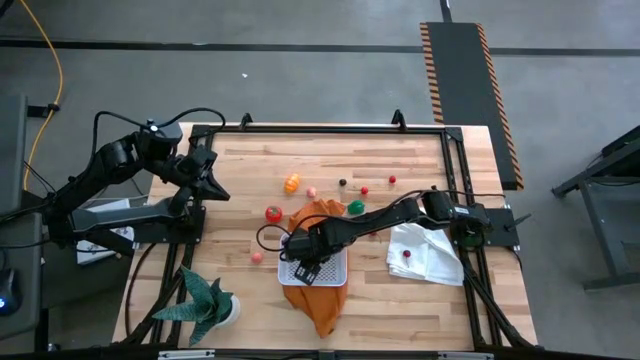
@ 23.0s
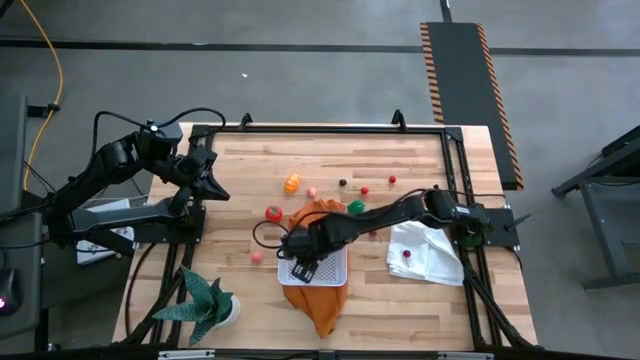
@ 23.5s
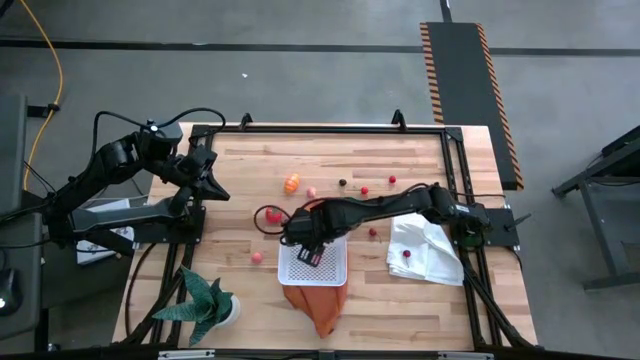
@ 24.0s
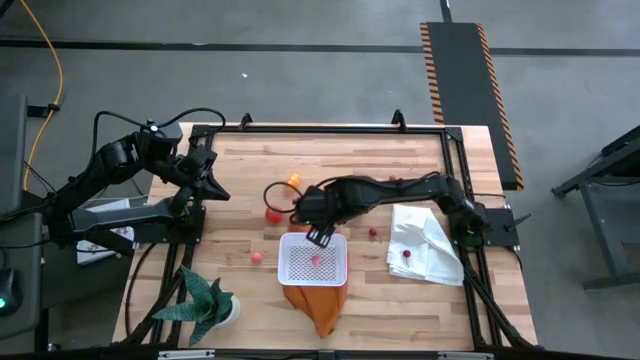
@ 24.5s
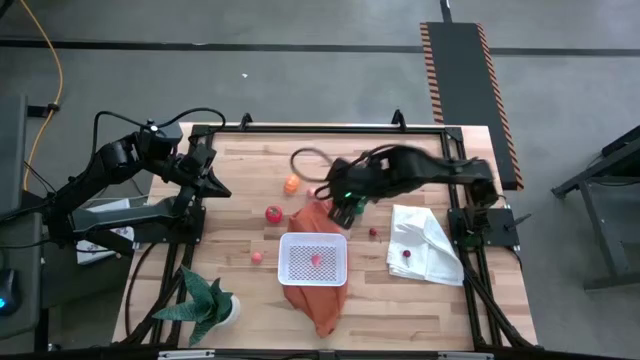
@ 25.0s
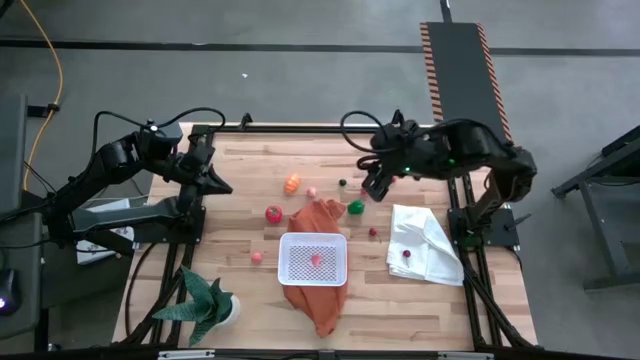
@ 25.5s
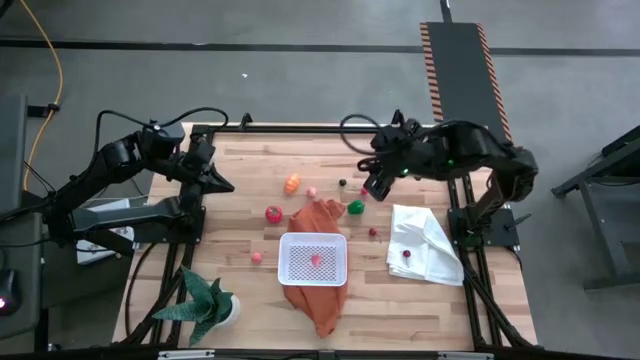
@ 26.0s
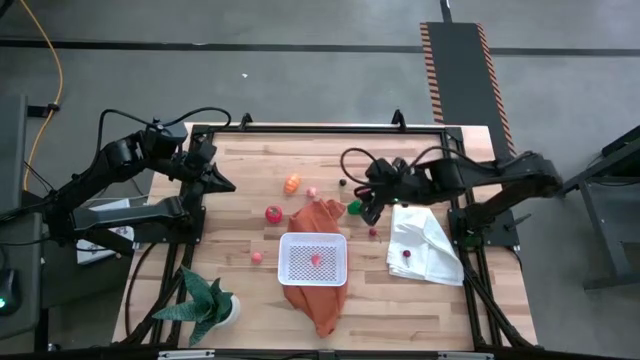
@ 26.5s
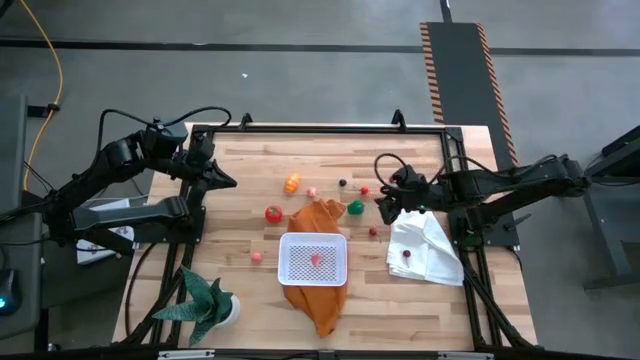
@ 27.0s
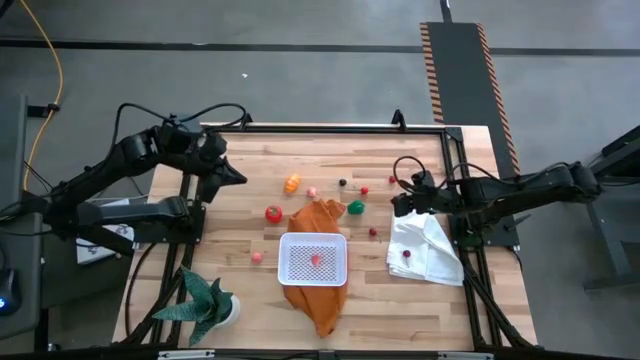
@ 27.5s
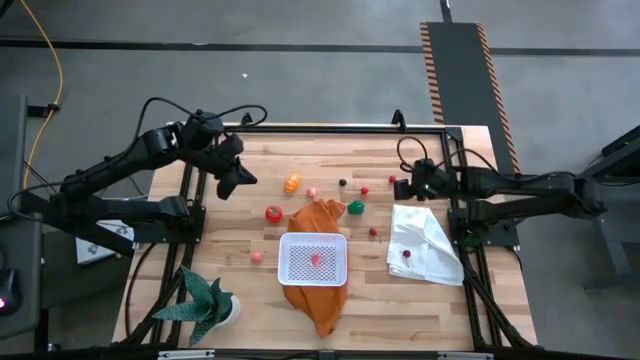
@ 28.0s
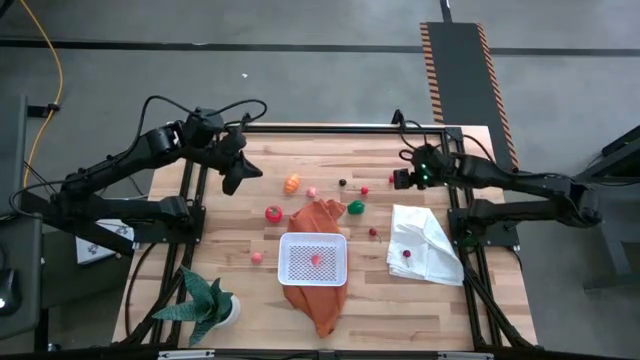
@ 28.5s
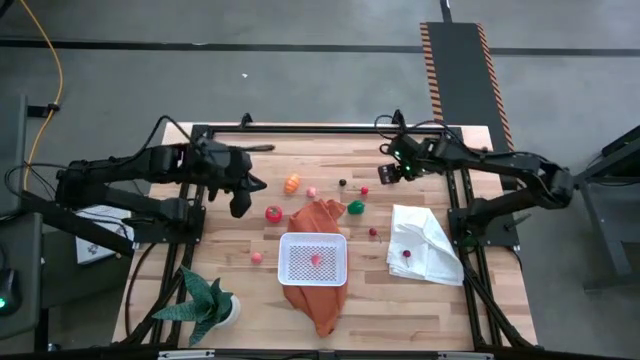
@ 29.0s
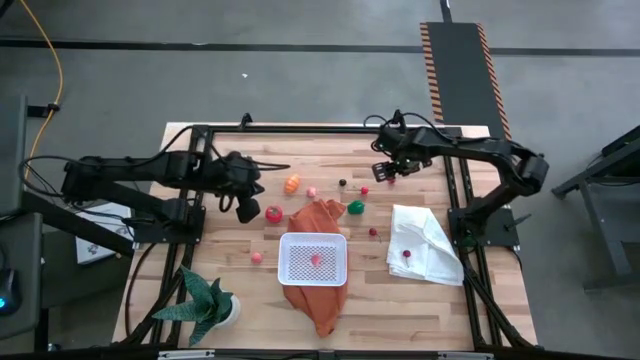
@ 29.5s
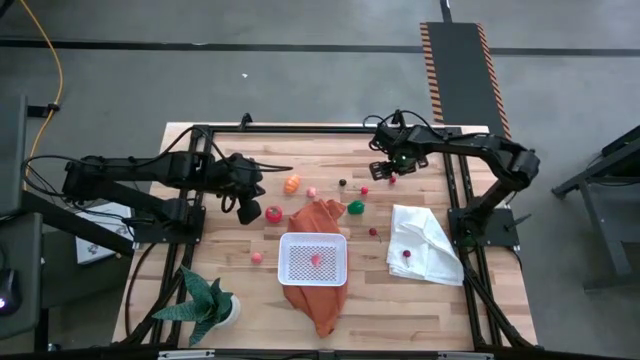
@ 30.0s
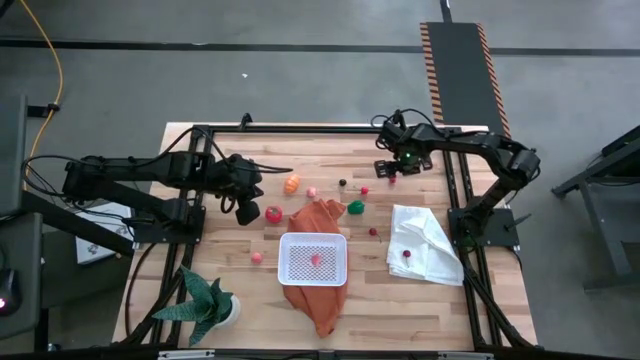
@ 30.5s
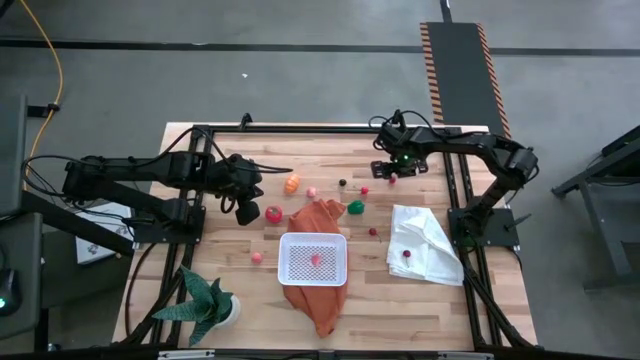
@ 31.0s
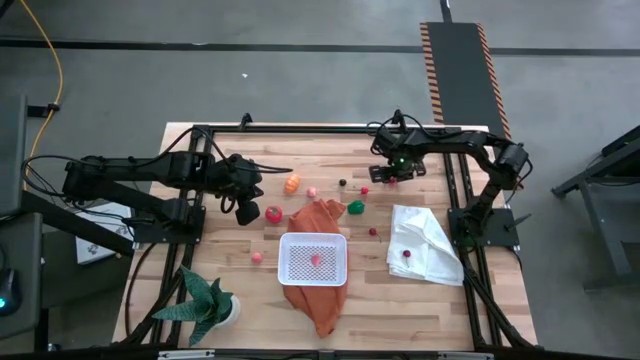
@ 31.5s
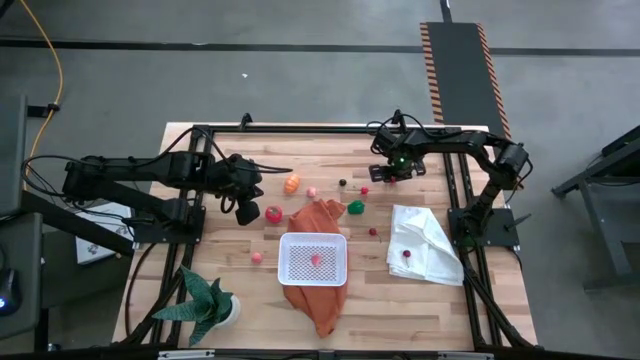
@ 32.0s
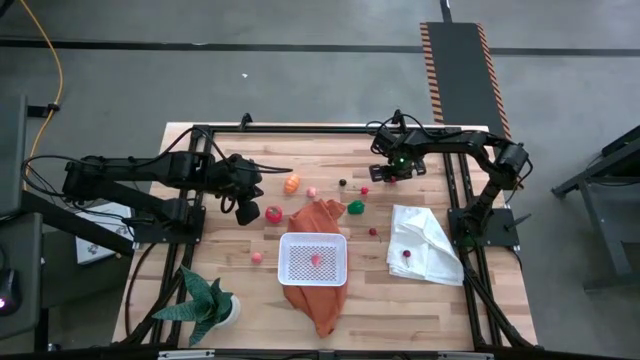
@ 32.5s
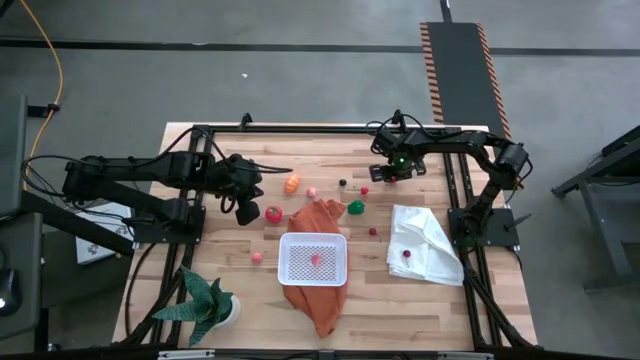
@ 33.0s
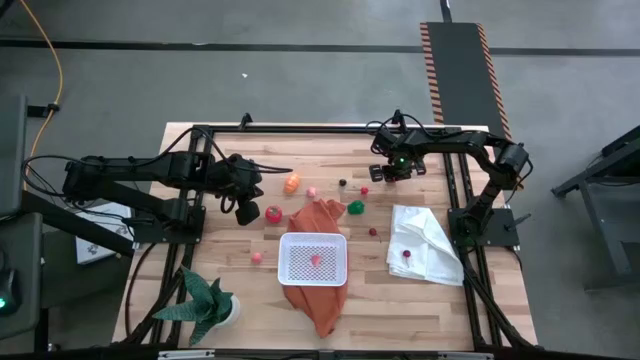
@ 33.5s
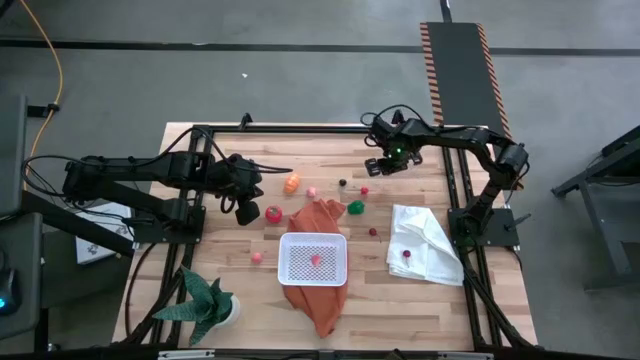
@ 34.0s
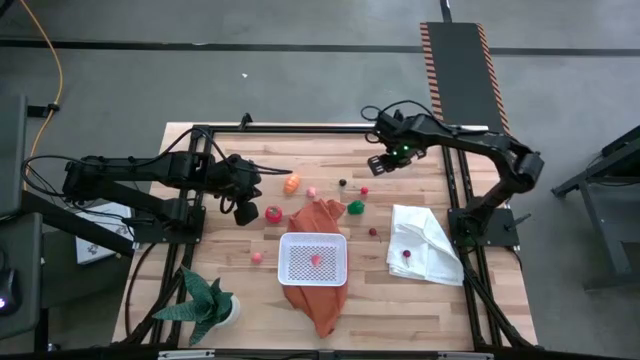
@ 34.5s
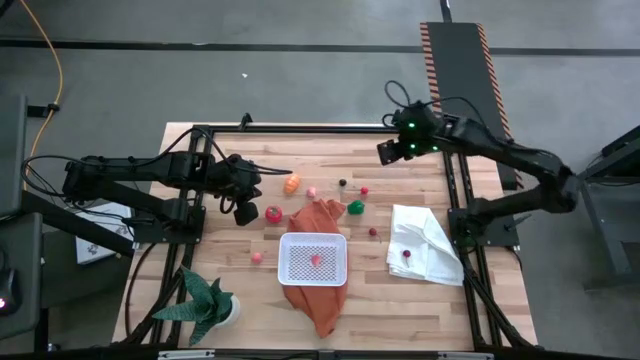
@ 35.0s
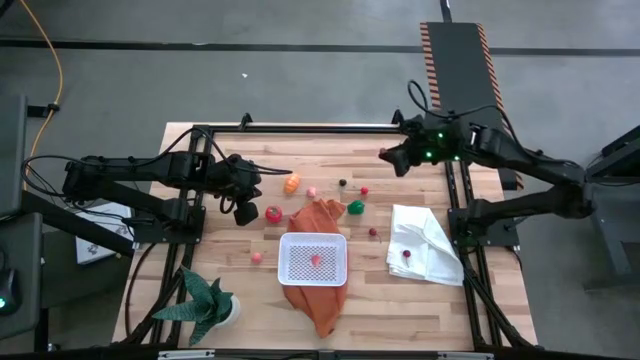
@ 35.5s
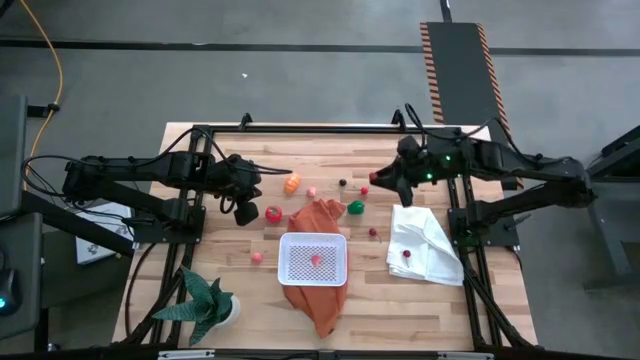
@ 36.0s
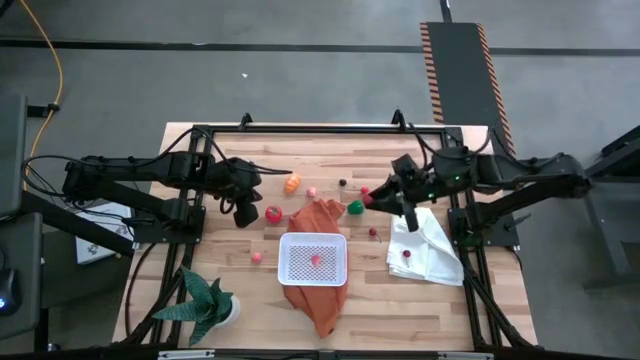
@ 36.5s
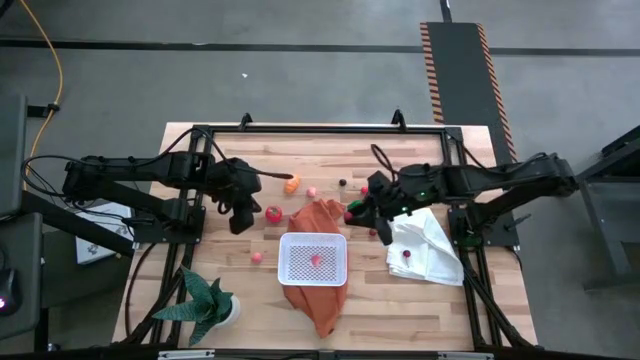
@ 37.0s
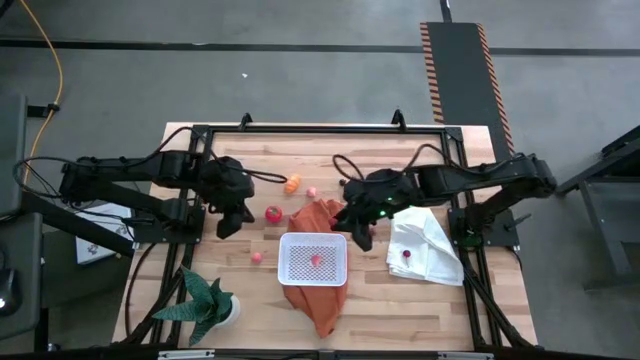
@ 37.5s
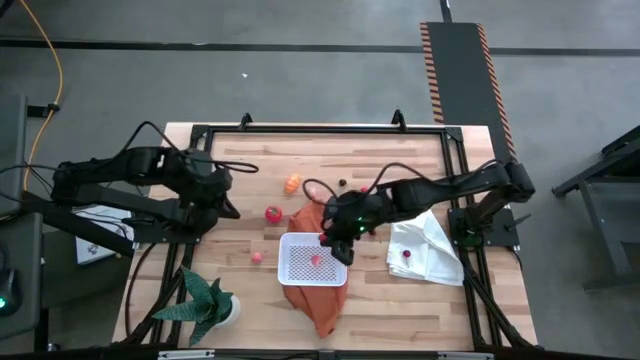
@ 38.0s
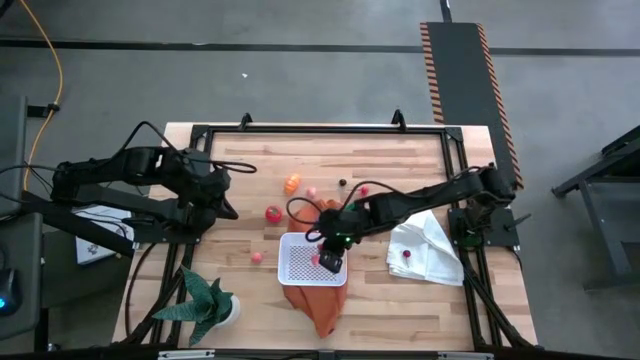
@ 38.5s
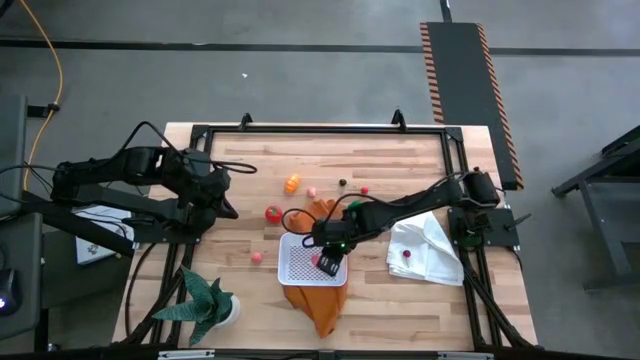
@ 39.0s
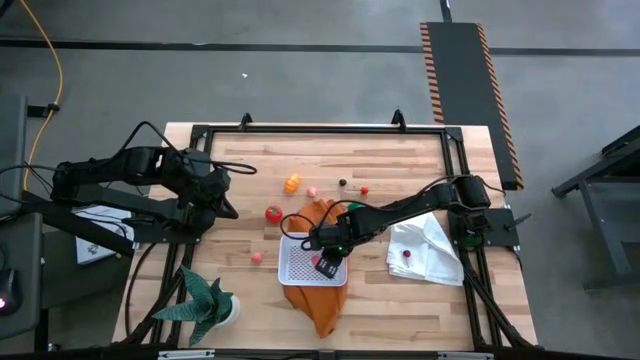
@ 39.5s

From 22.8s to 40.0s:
Task: Pick and placing Produce into tupperware
Put the red raspberry into the white basket
